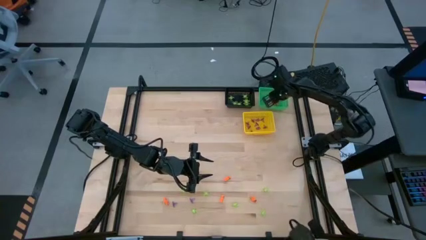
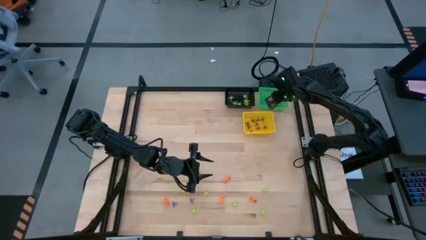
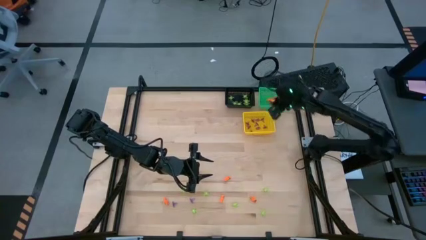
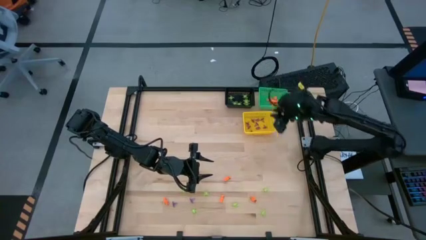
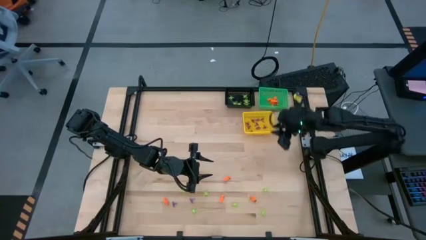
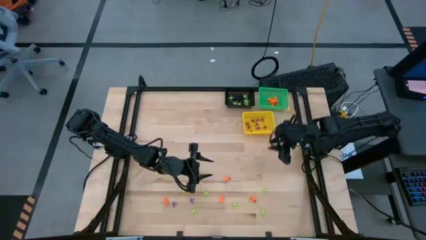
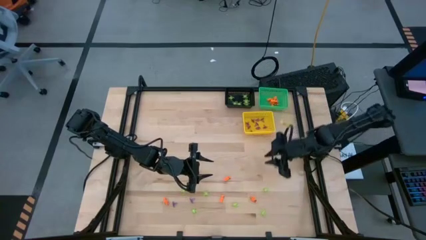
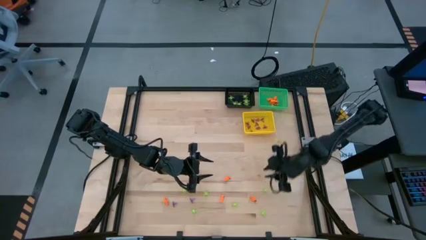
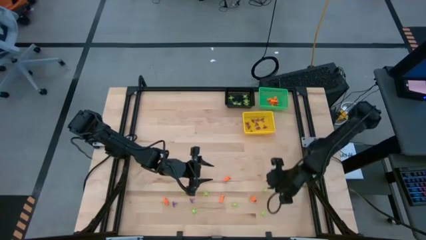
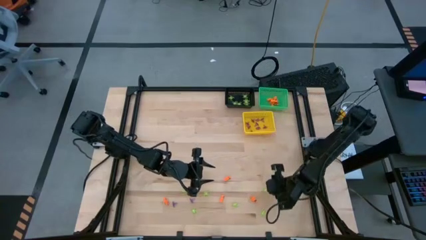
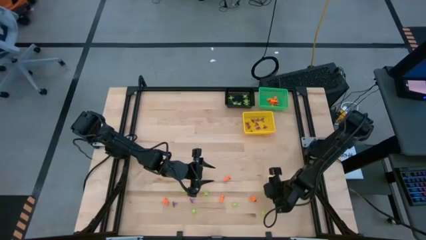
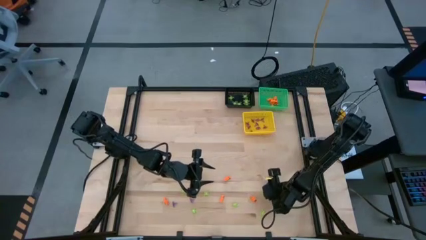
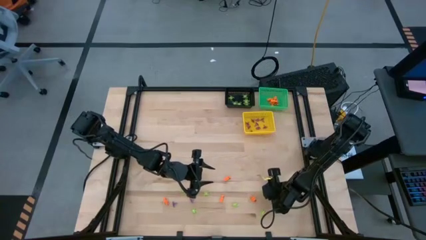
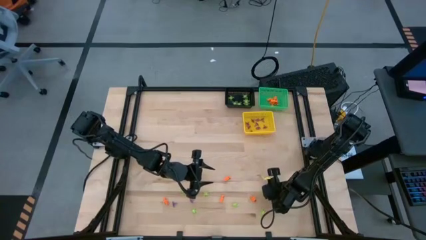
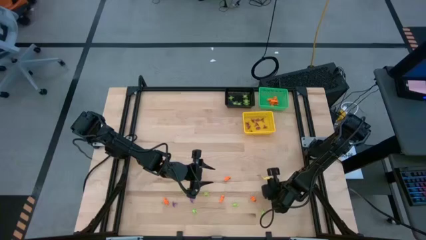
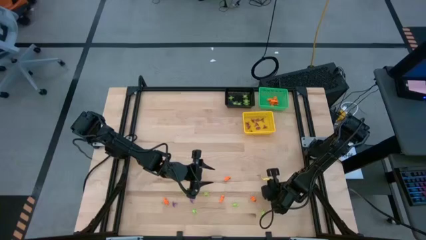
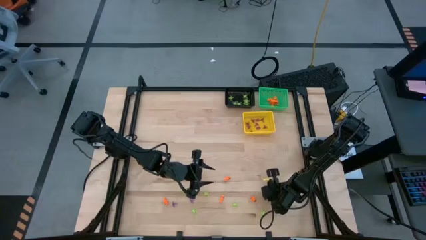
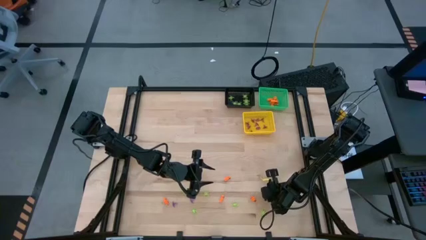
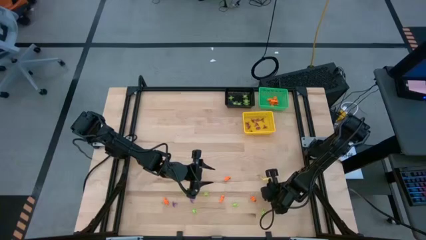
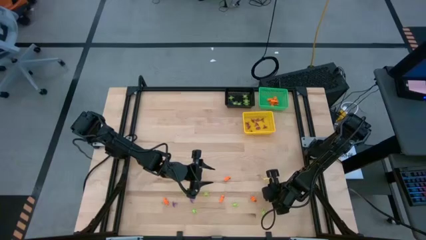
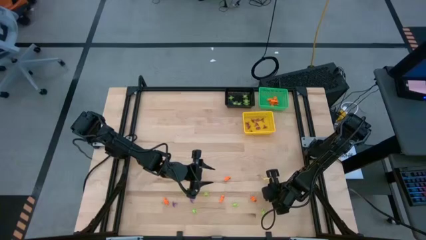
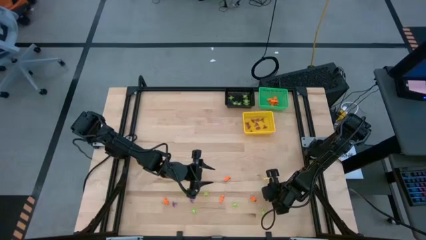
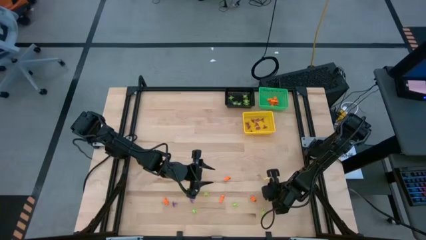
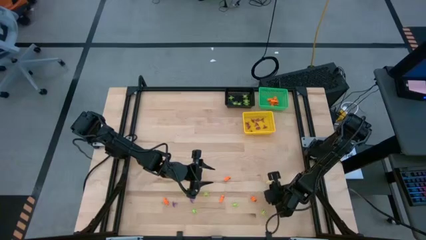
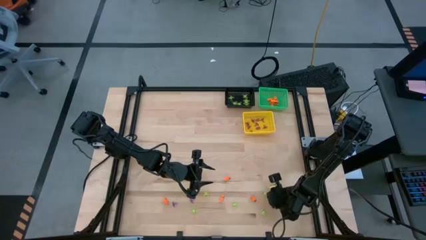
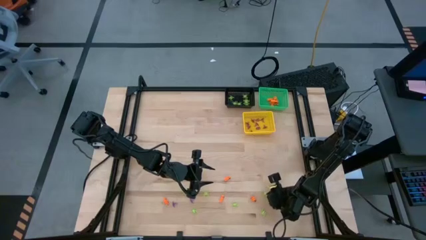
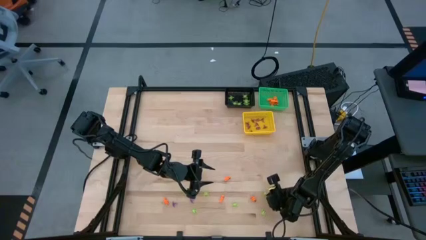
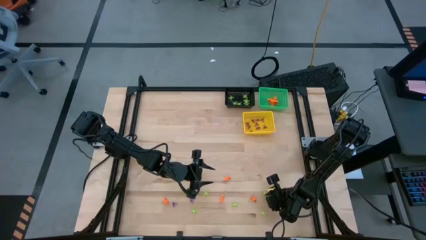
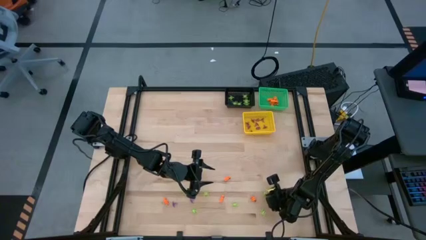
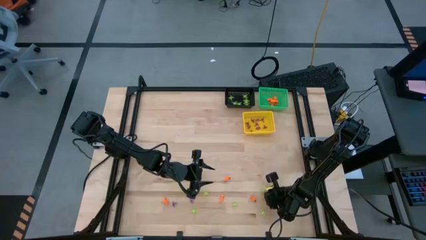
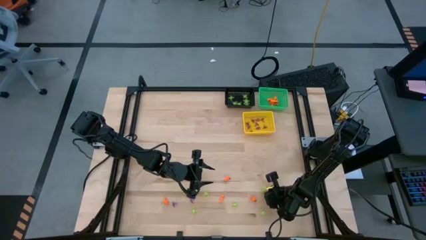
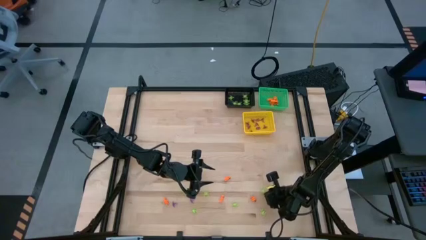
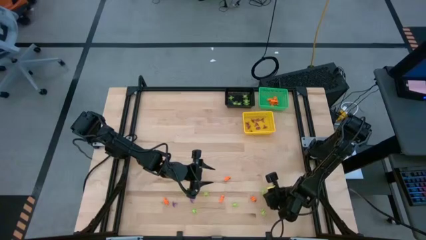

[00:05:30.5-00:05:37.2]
Task: Sort Halloween decoration
Put the green spider toy into the black basket

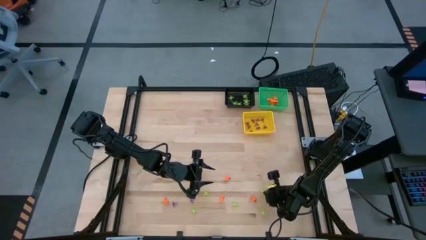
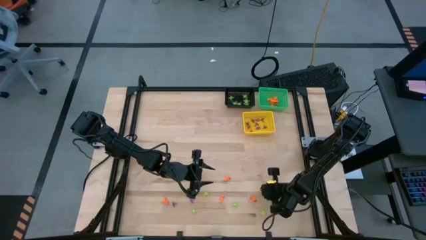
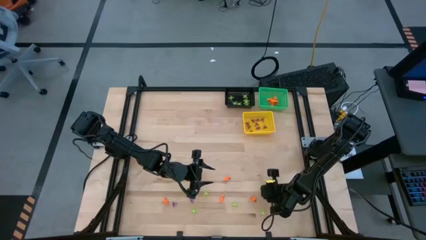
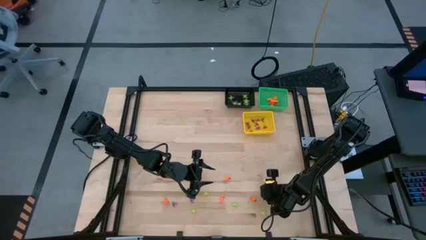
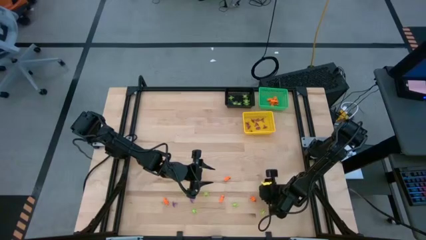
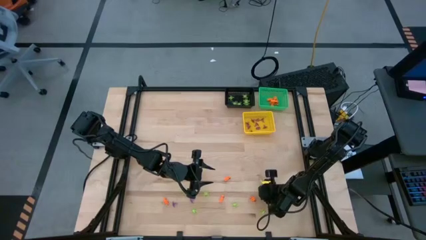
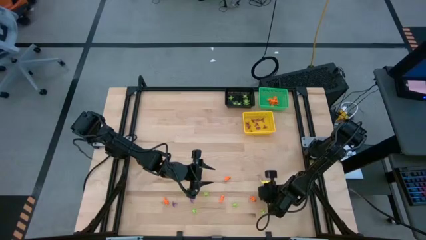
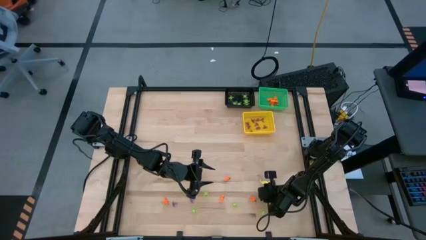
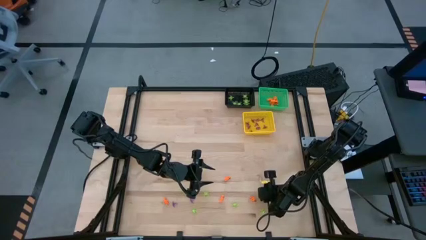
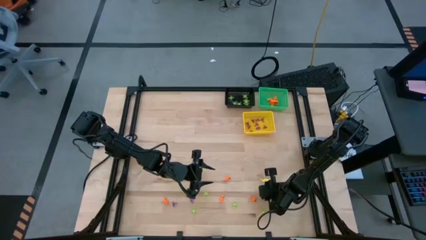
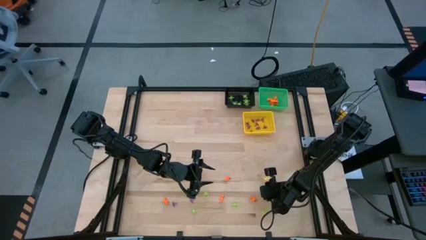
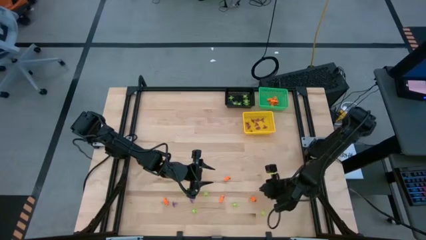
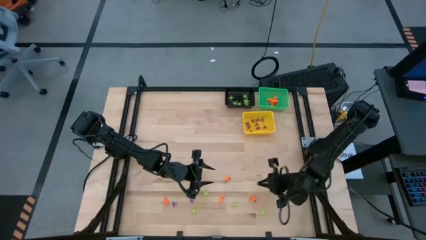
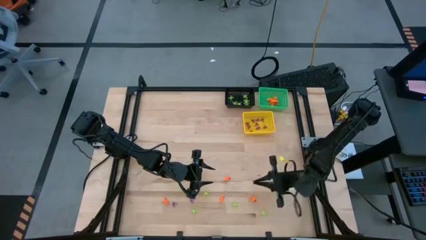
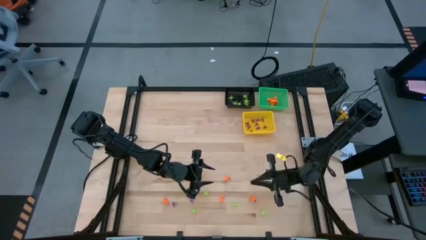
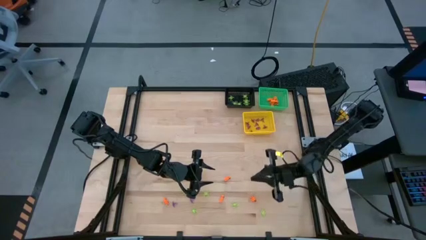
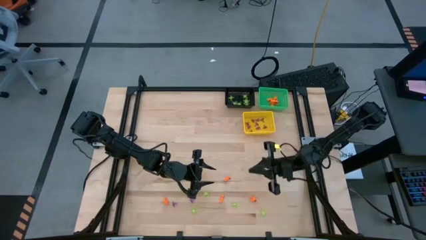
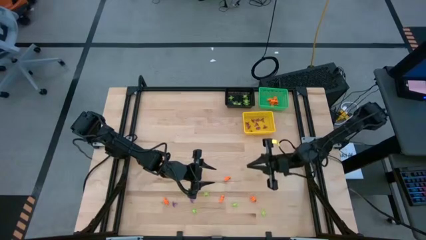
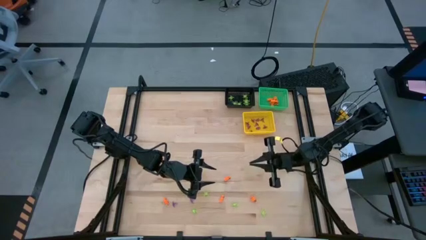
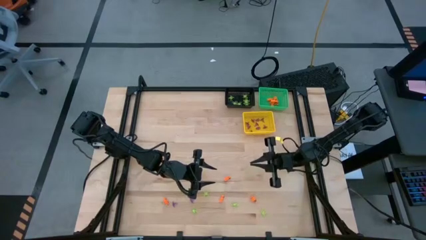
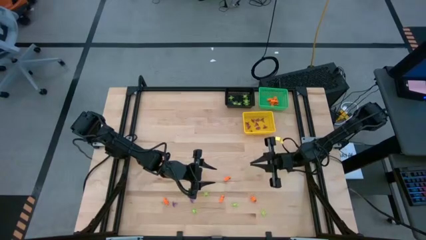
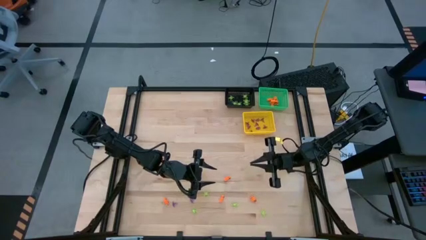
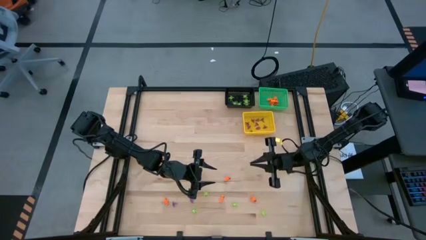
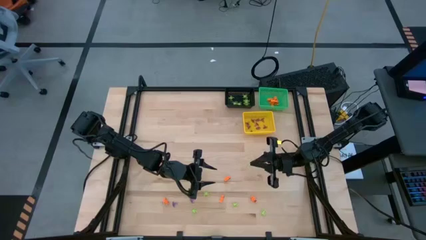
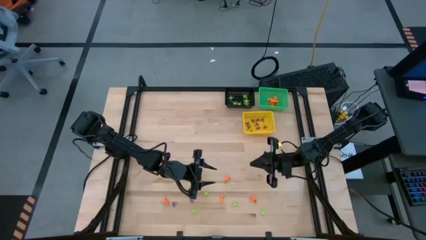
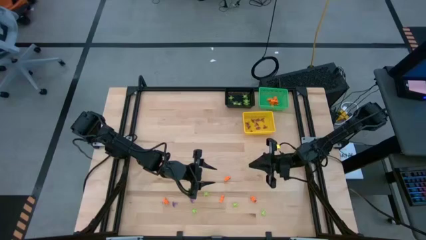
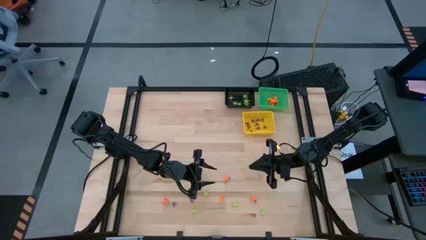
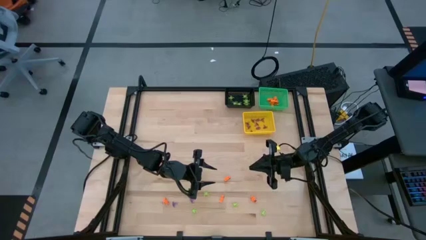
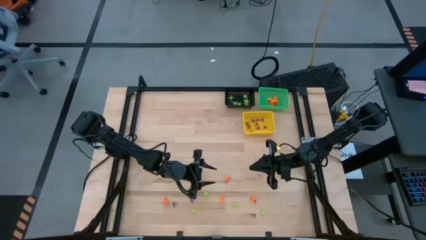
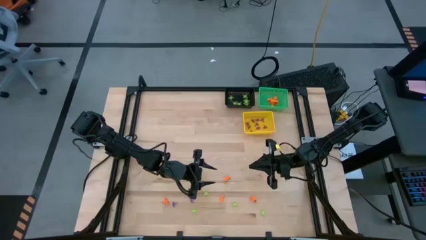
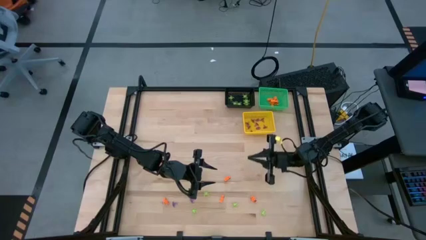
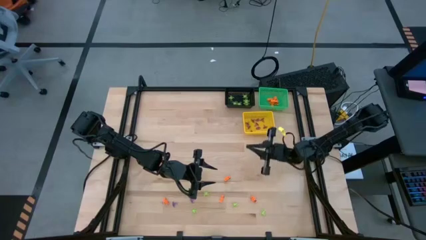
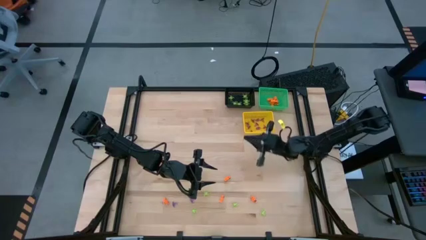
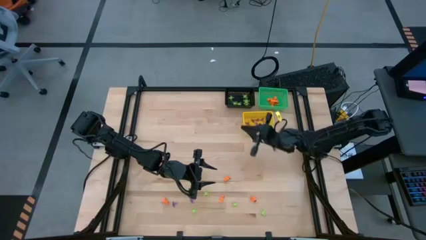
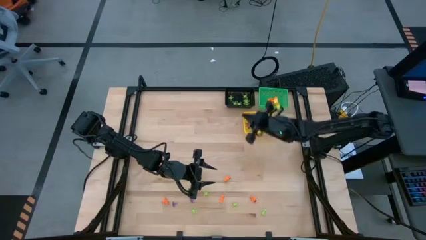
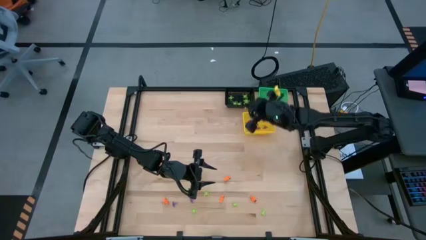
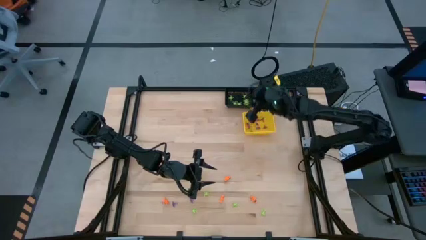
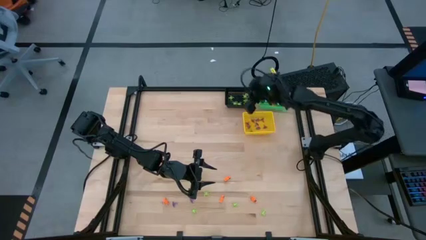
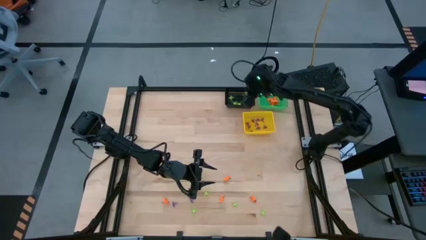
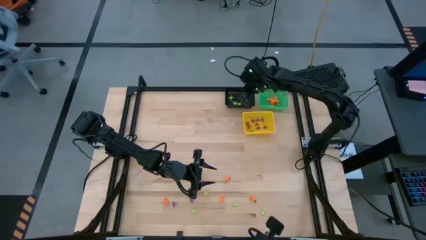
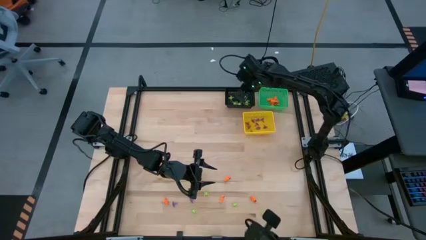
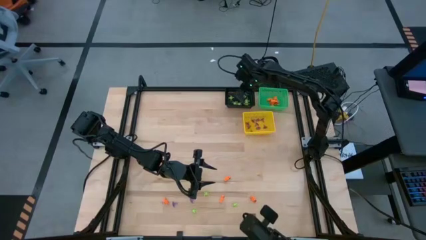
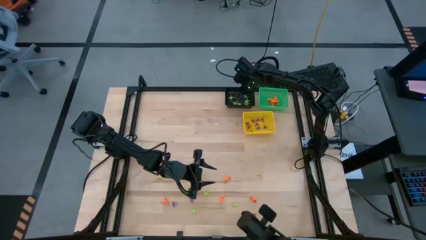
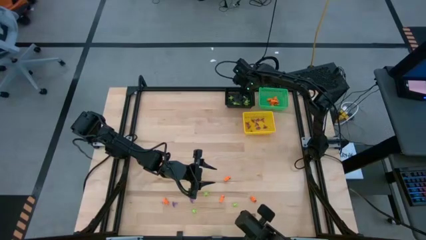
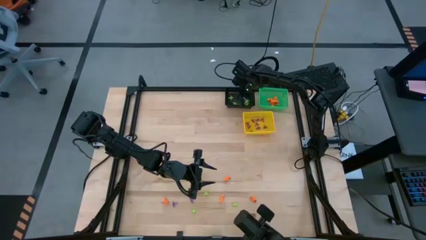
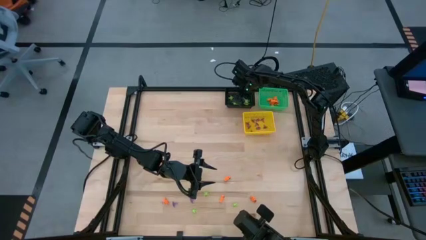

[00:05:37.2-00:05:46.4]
Put the green spider toy into the black basket

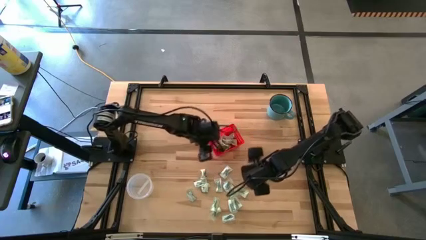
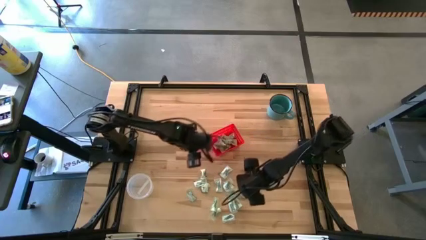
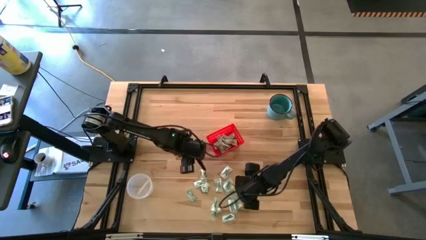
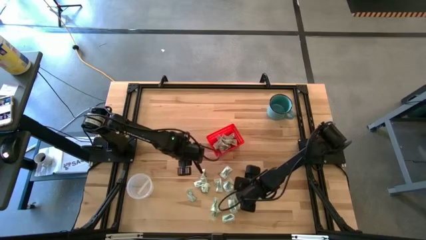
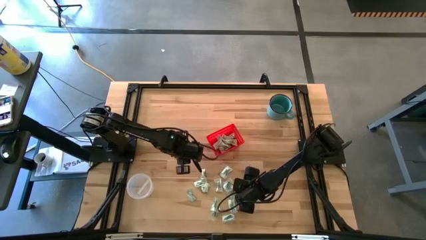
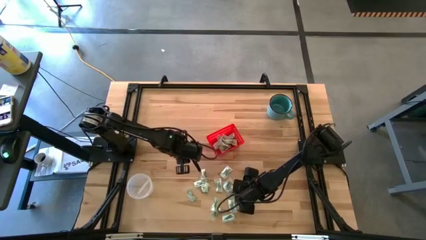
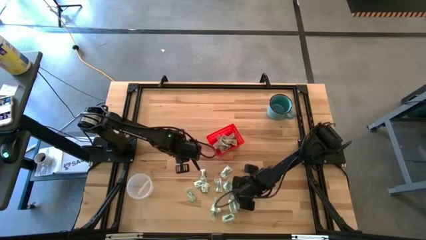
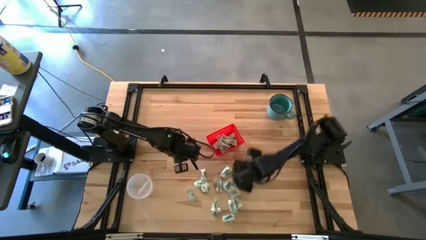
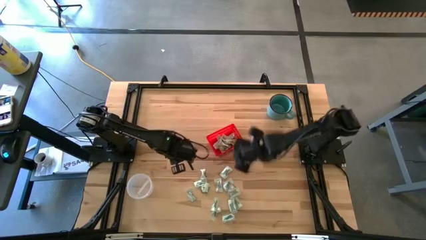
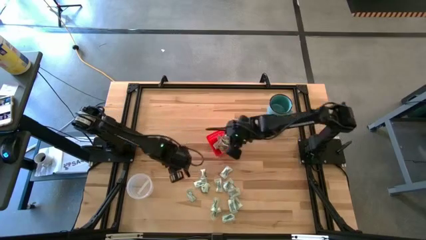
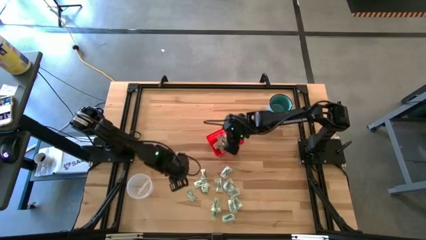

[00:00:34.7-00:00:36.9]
Task: Pick and place items into bin
Put the stevia packet into the red bin
